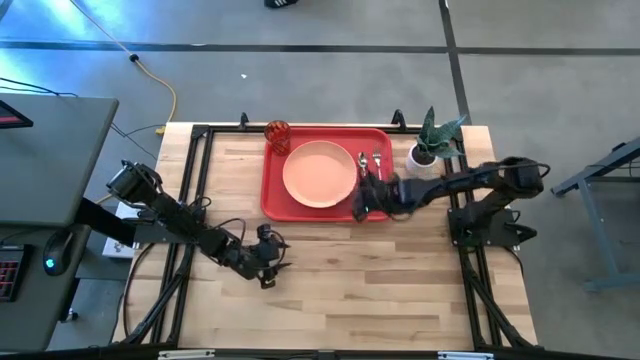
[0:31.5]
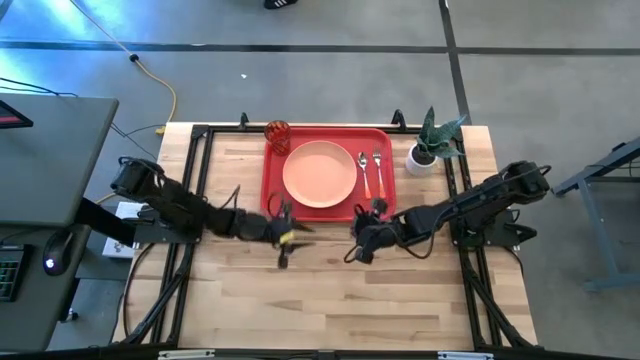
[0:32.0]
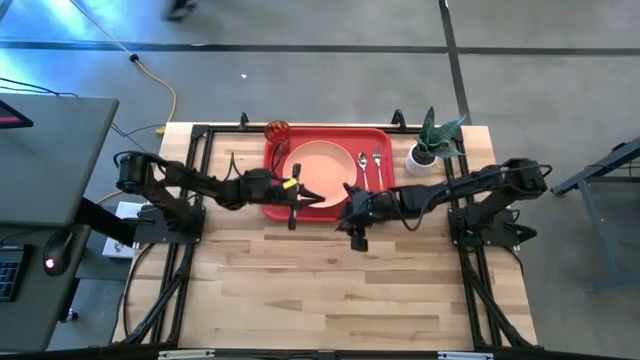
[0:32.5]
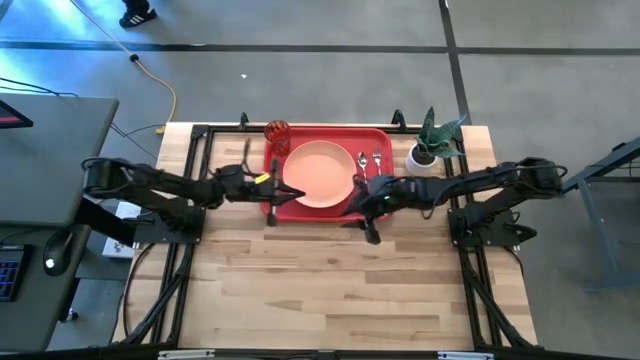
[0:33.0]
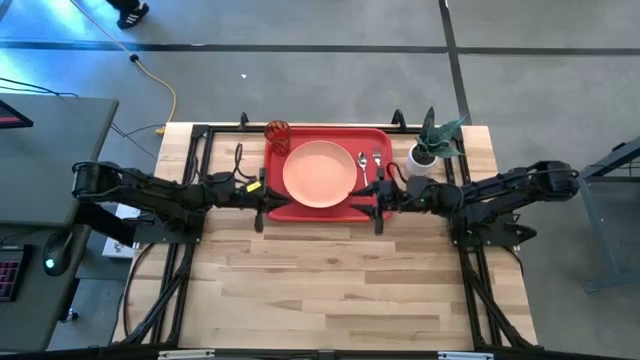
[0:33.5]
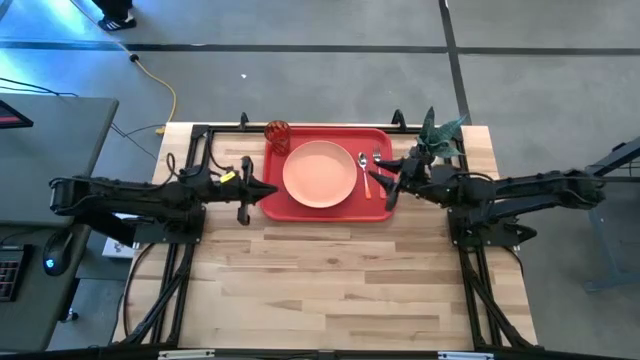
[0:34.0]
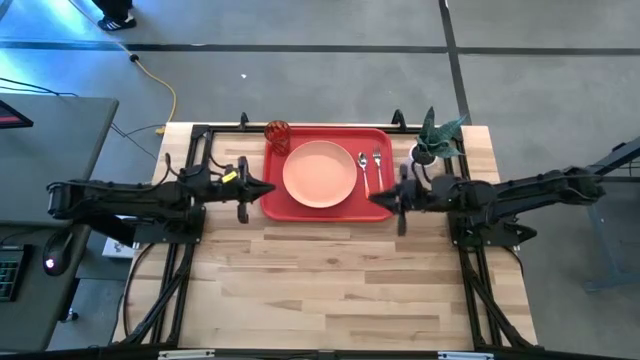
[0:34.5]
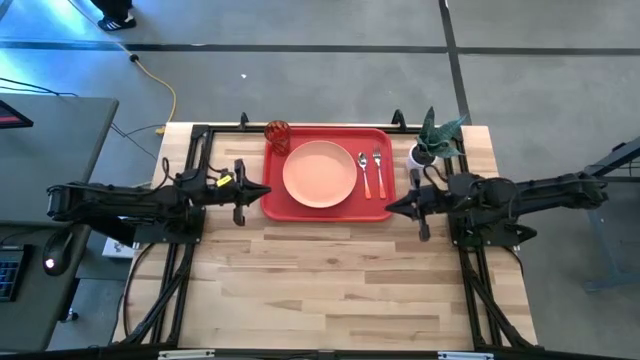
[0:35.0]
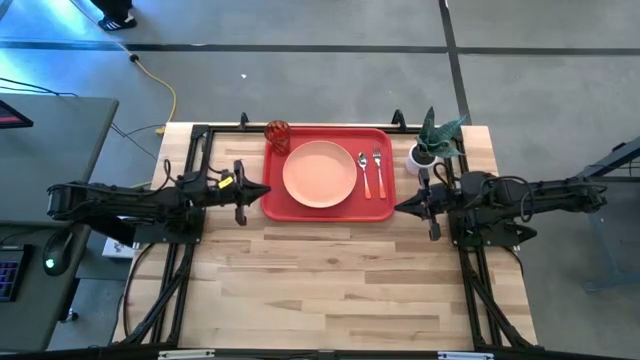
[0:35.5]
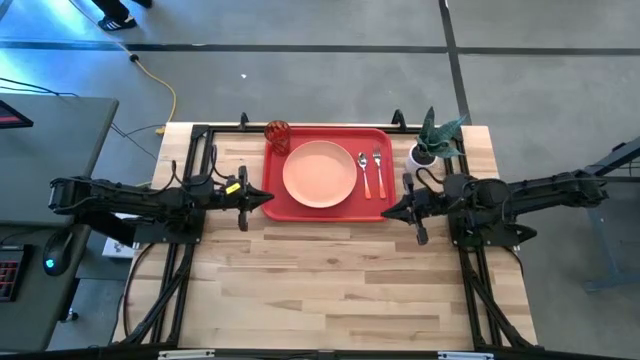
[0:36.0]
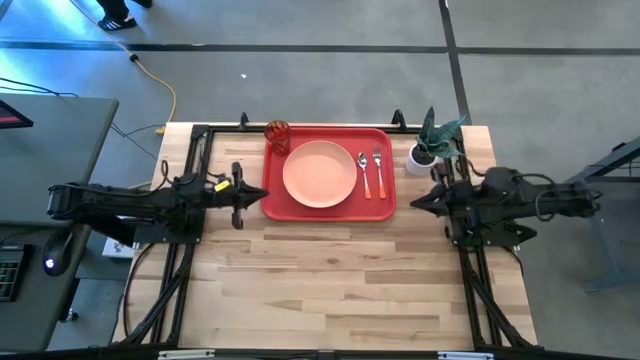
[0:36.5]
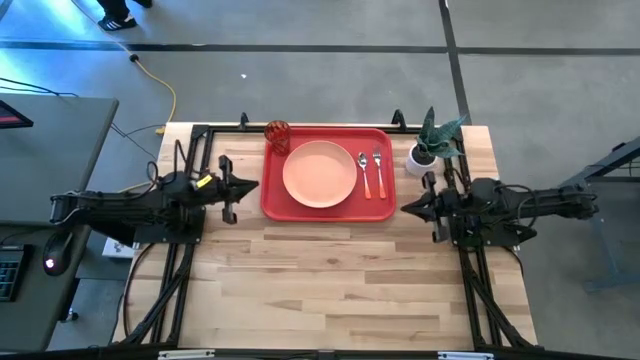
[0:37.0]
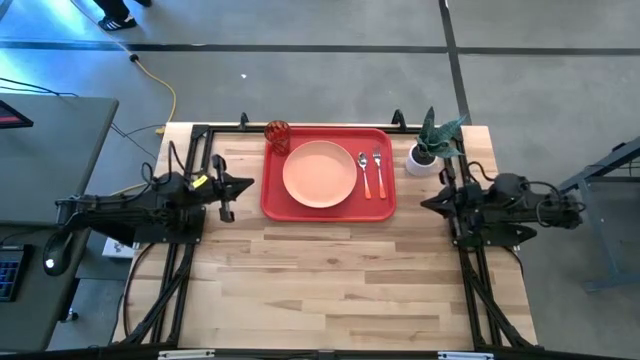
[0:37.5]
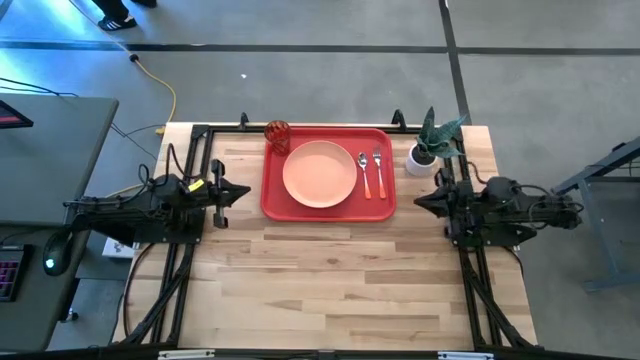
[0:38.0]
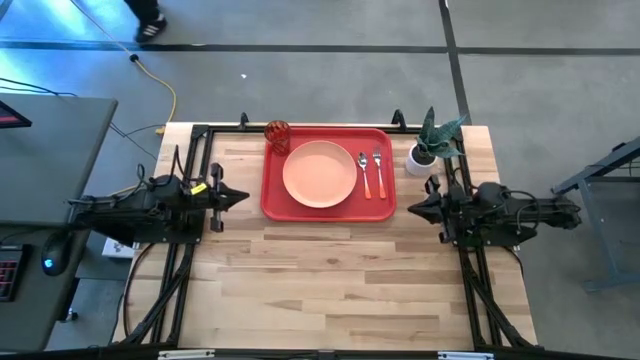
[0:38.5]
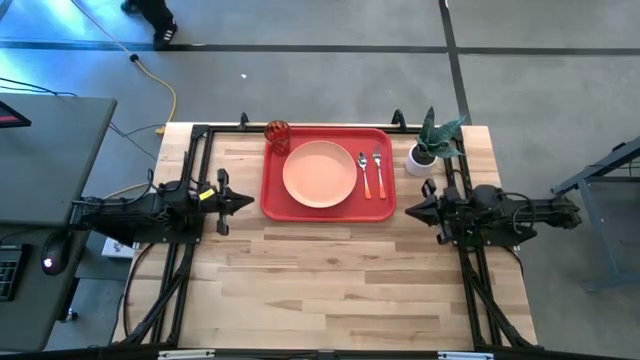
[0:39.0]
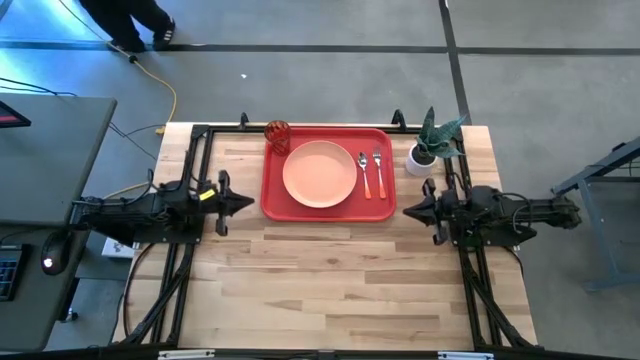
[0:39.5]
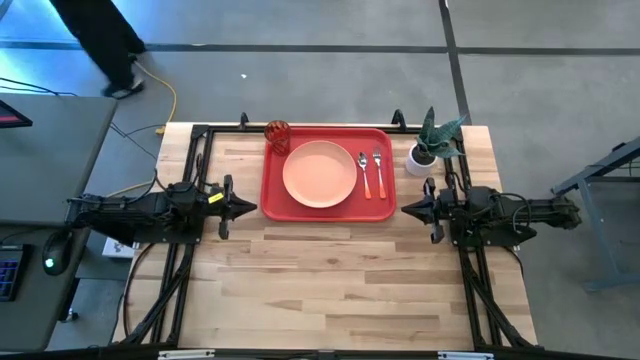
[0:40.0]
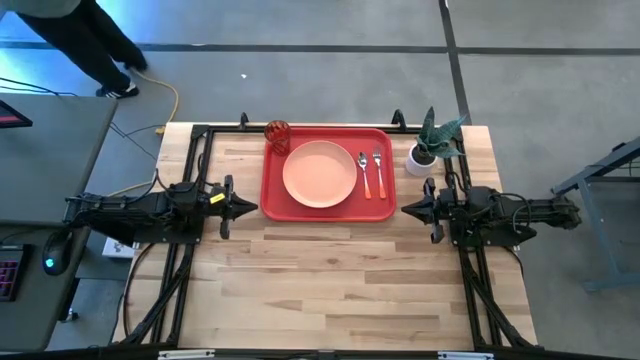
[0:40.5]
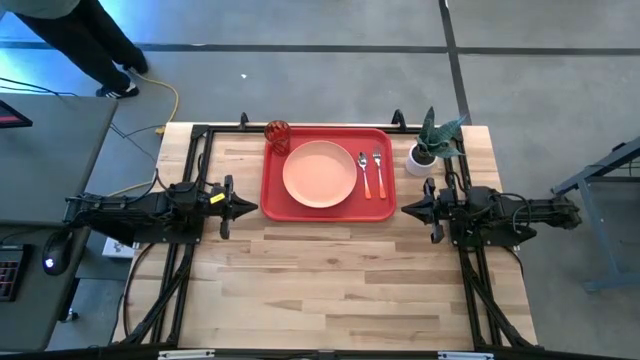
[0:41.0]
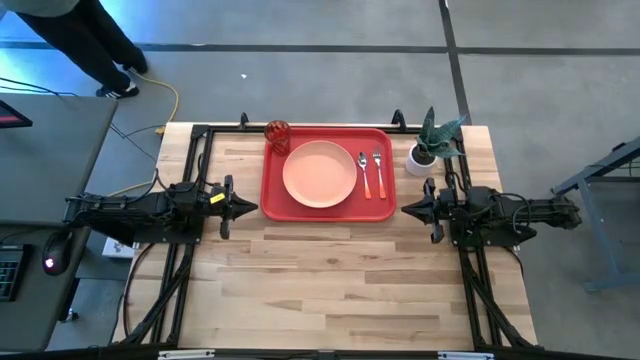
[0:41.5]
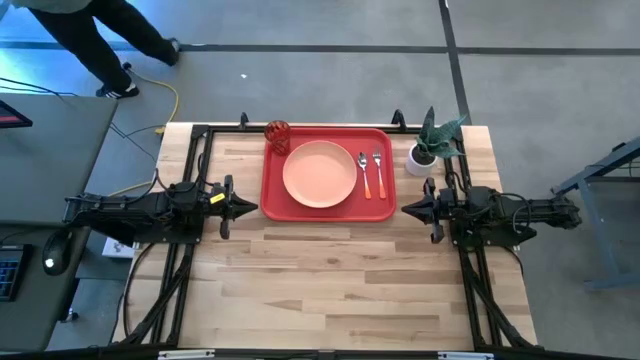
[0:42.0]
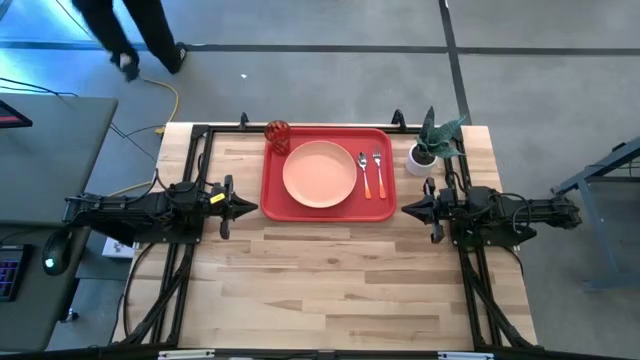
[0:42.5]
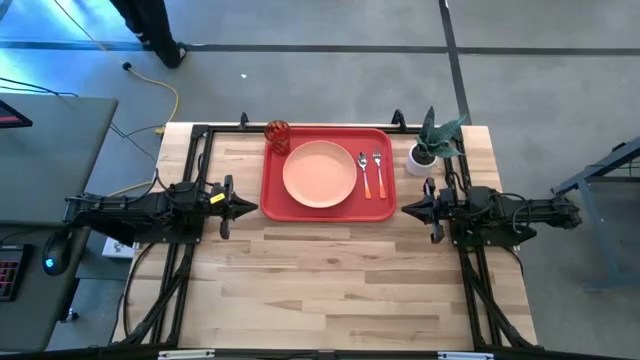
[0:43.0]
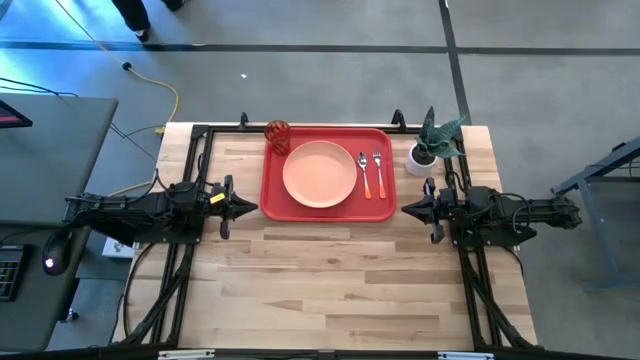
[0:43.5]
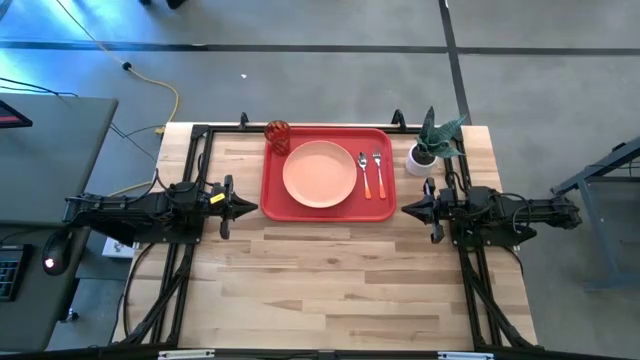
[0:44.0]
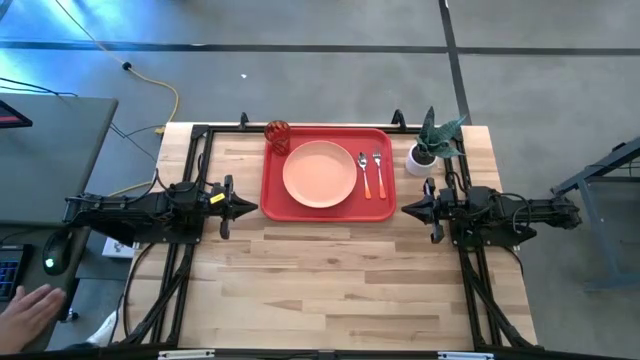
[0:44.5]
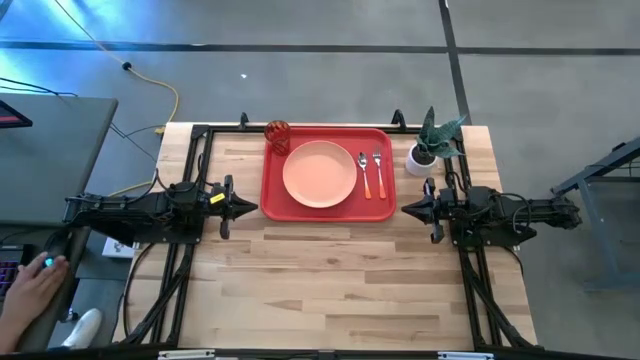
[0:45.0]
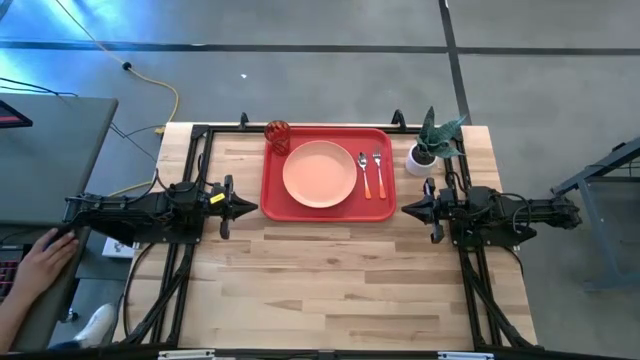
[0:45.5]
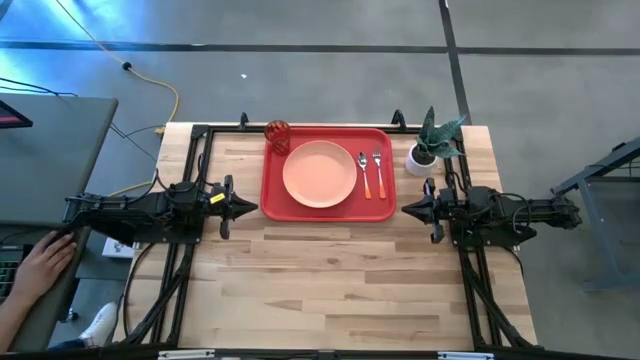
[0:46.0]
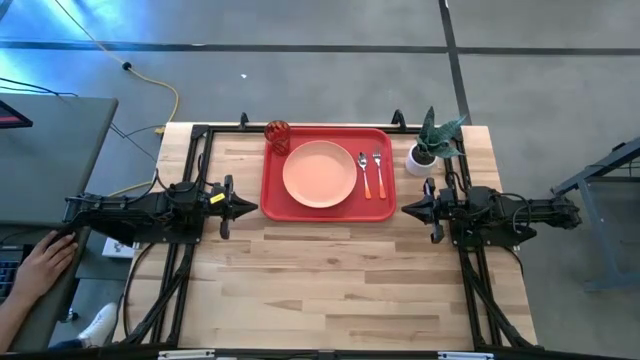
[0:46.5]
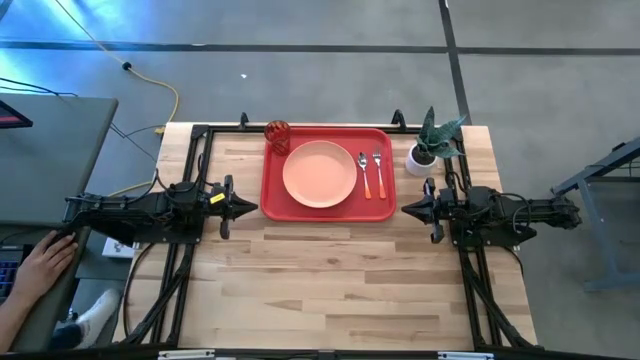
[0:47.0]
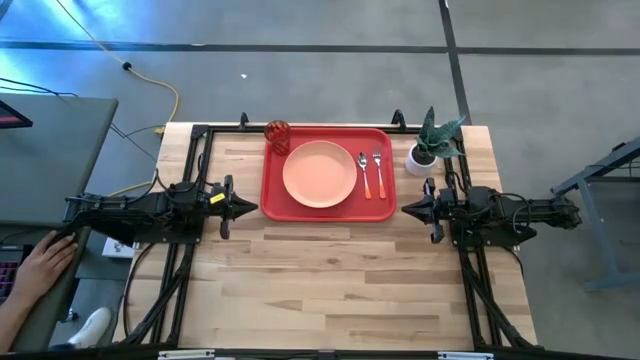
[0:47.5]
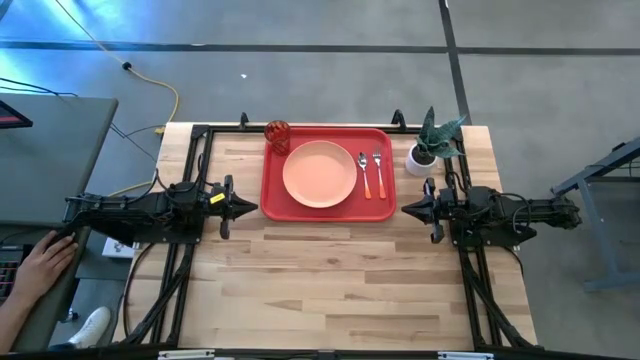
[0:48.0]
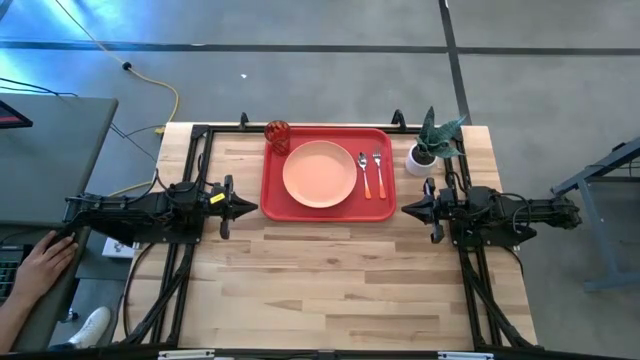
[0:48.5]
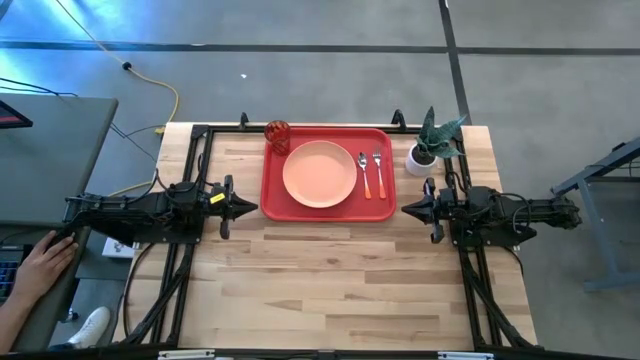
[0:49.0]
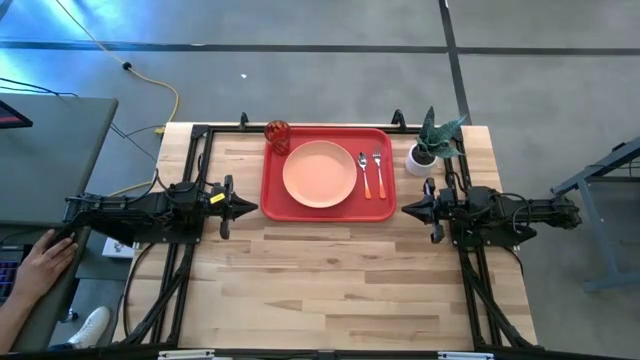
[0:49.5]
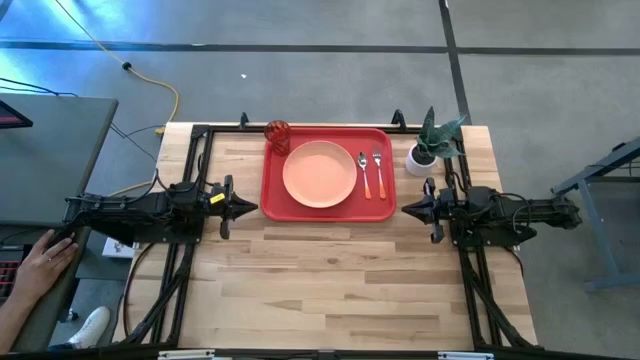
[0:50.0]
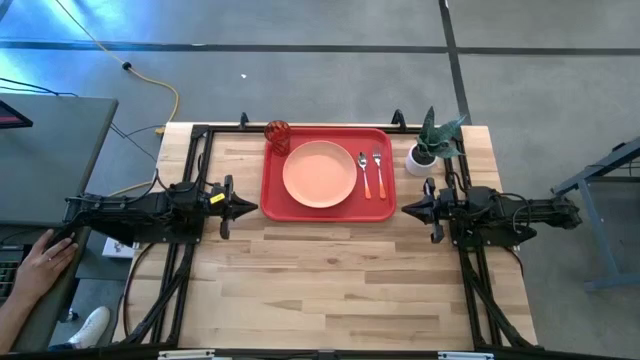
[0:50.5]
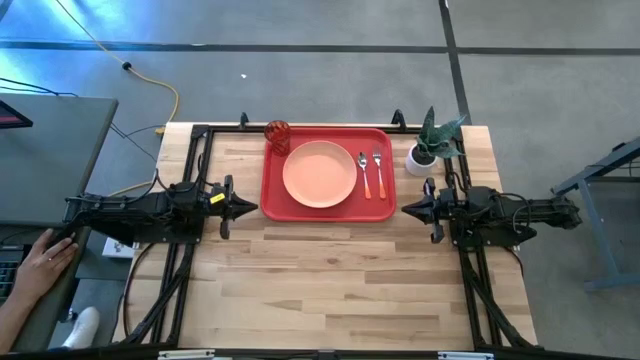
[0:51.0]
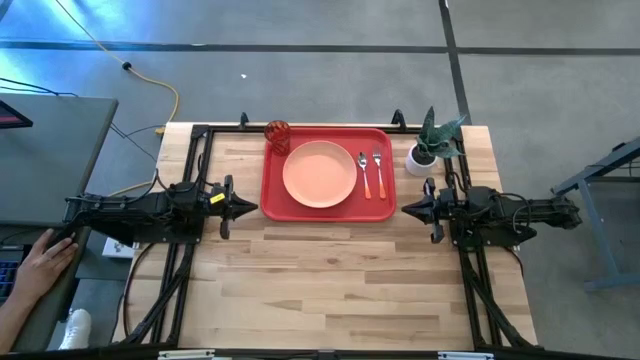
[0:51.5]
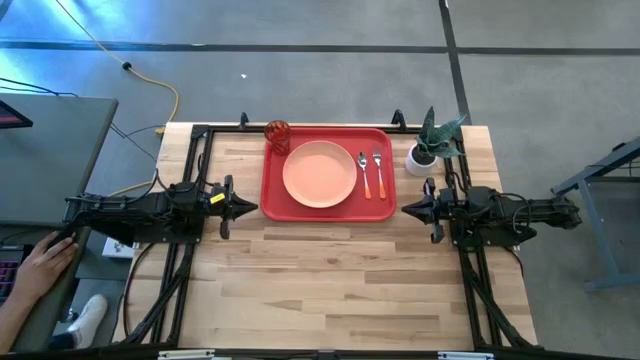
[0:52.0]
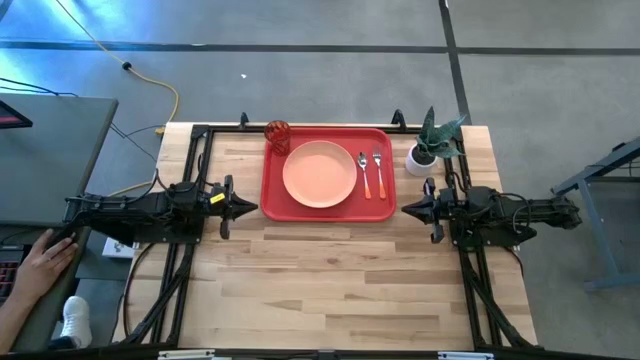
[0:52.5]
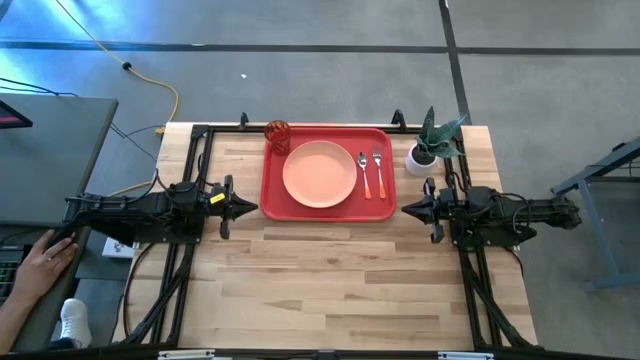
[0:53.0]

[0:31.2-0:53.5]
Task: Pick and place plate/cup/fork/spoon on tray
Return to Home Position
